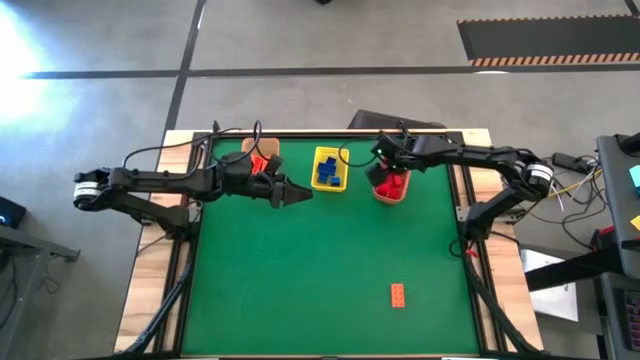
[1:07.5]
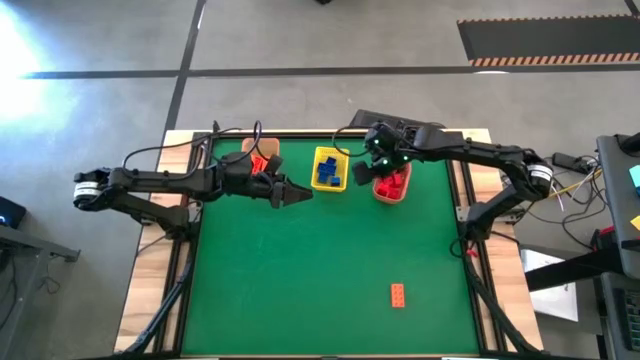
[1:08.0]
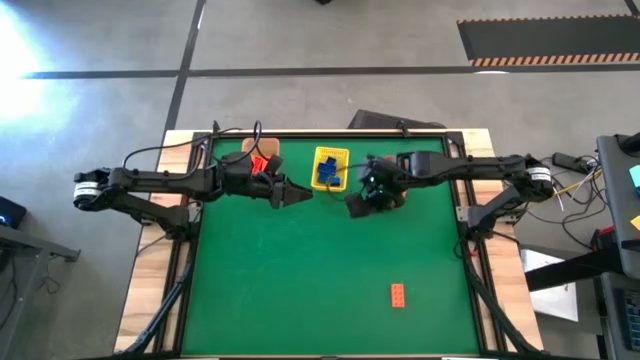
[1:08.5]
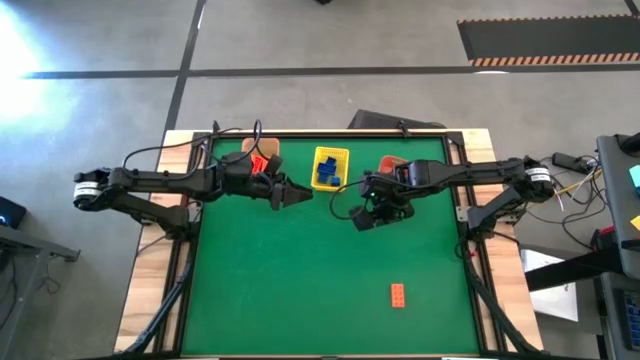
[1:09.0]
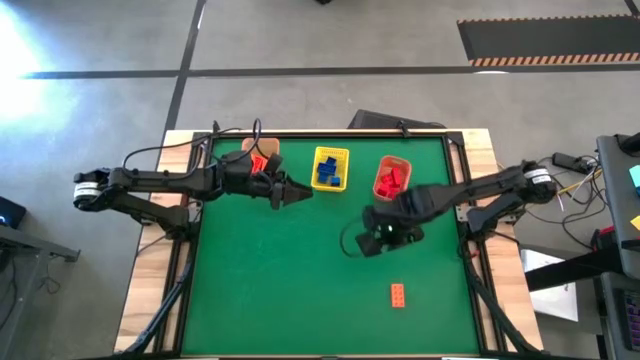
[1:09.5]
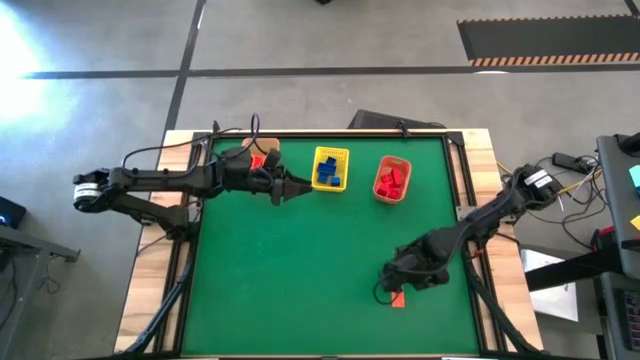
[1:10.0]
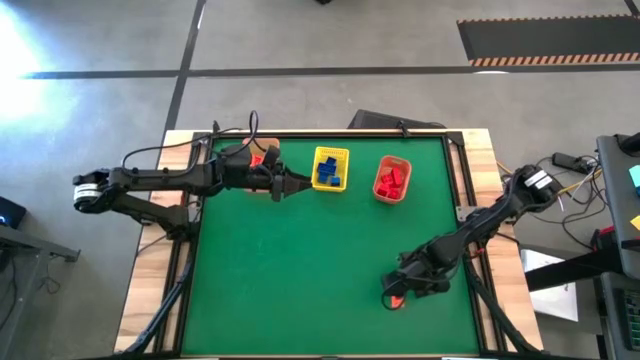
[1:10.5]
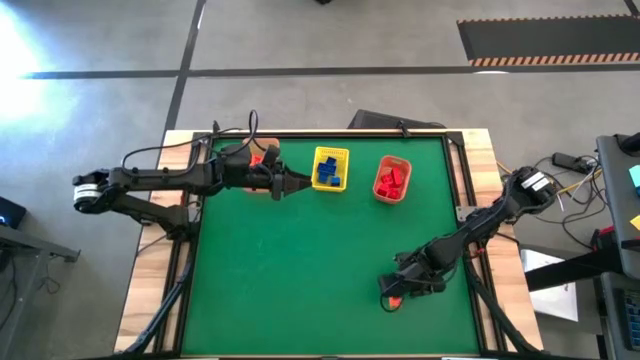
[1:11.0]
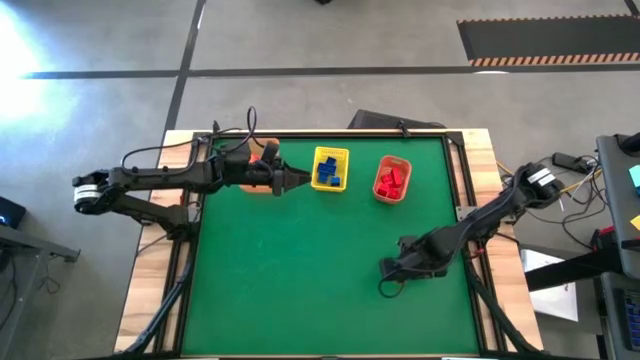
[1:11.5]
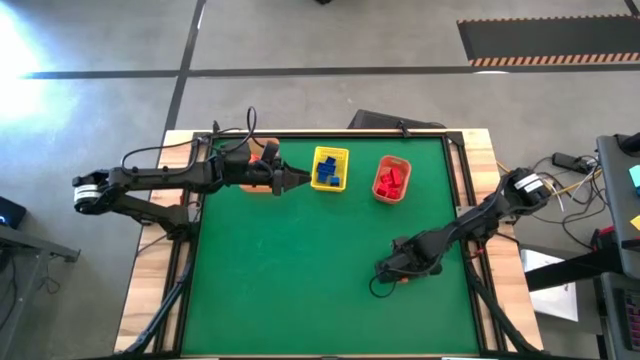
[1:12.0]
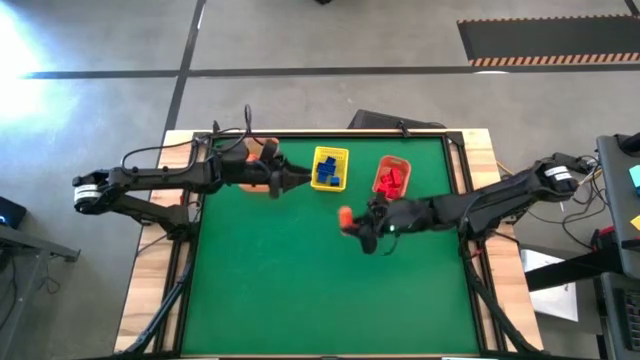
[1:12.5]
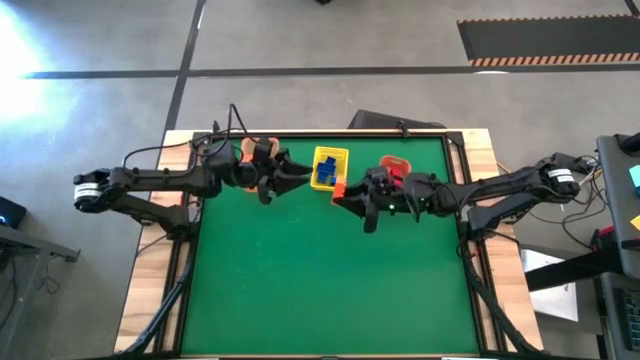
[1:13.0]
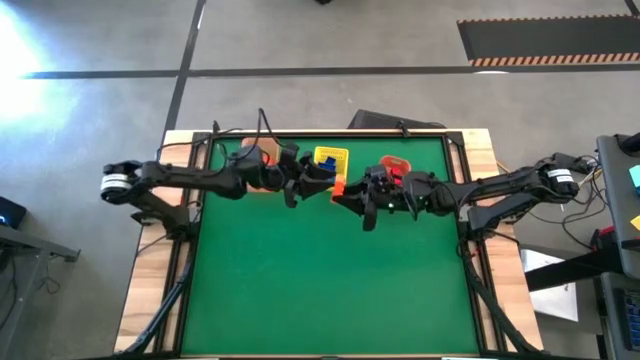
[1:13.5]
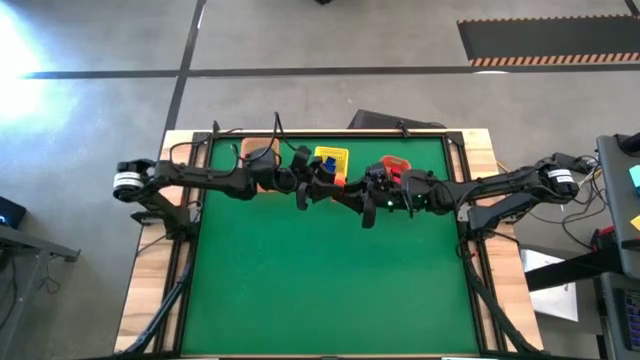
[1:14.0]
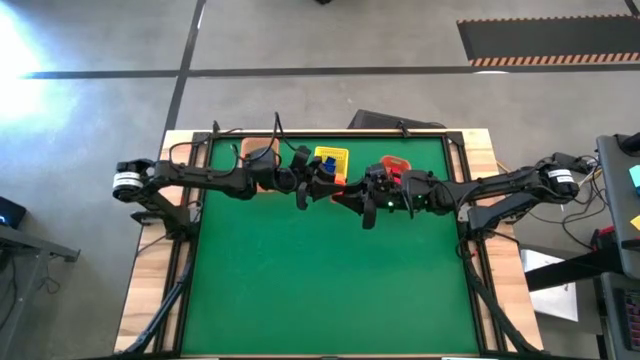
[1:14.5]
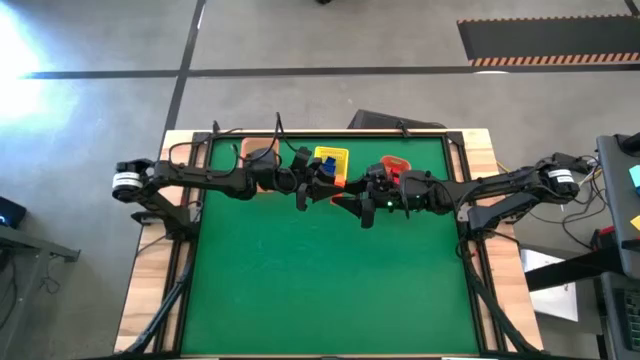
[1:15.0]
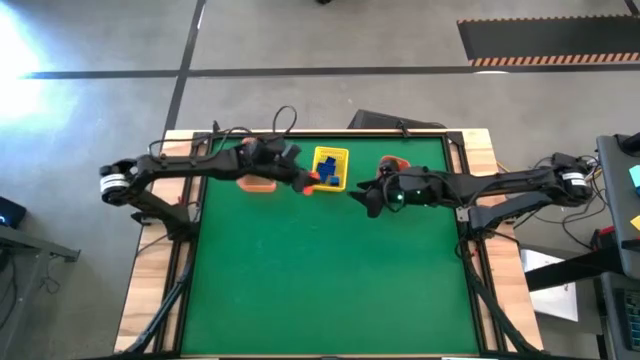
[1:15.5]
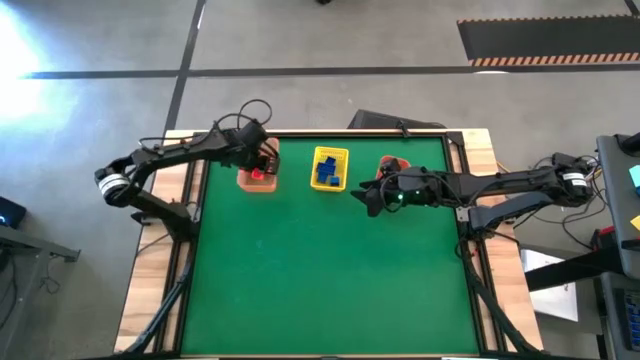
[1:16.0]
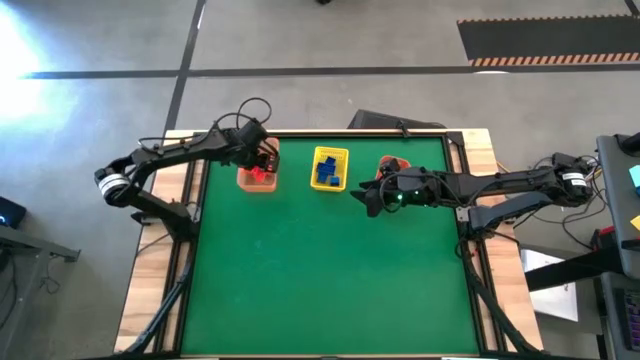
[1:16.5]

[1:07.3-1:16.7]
Task: Sort & place blocks by color
Put the orange game piece into the light orange bin

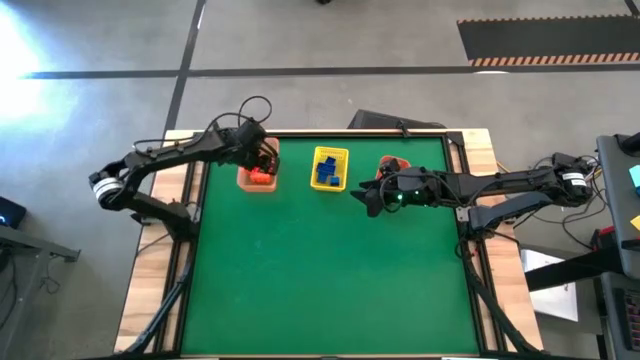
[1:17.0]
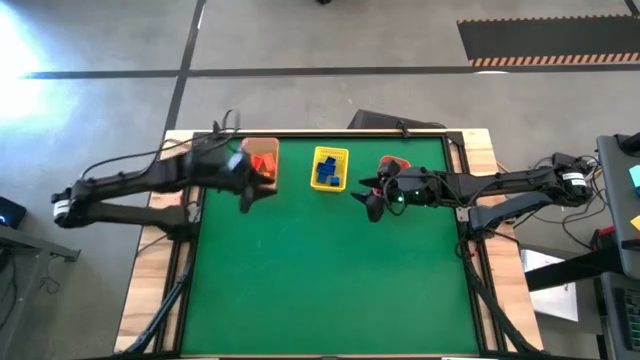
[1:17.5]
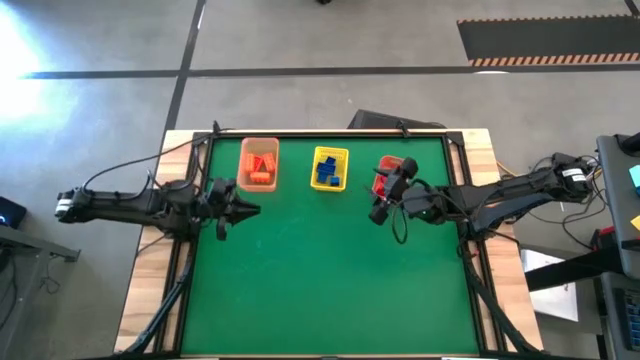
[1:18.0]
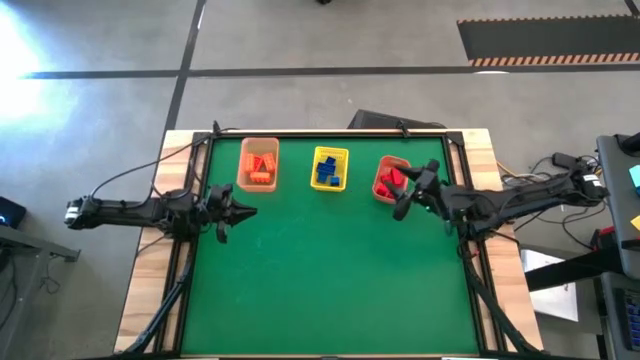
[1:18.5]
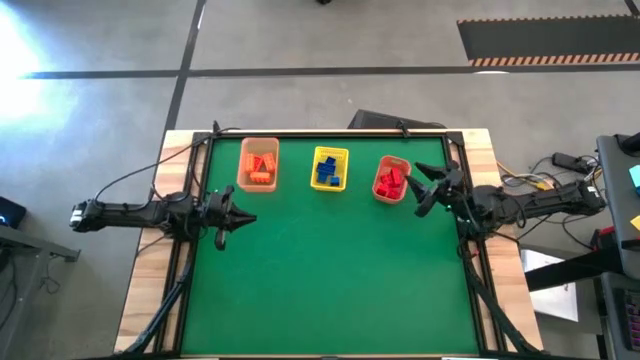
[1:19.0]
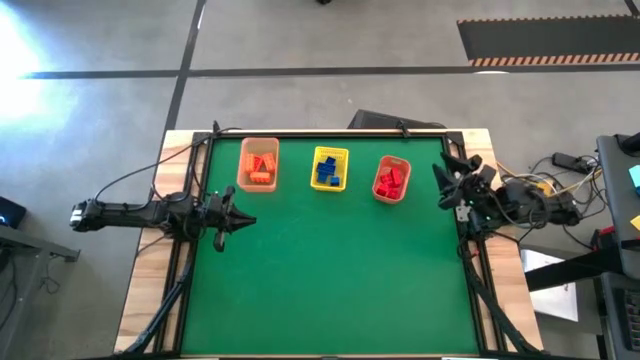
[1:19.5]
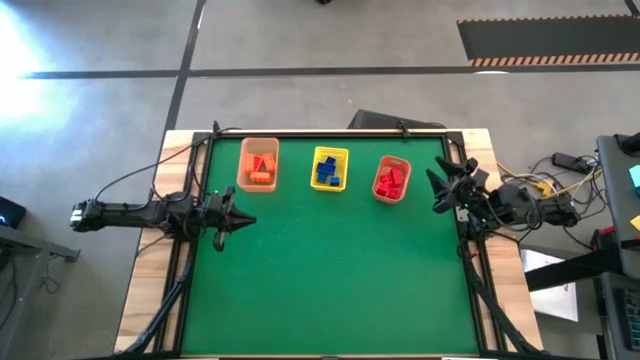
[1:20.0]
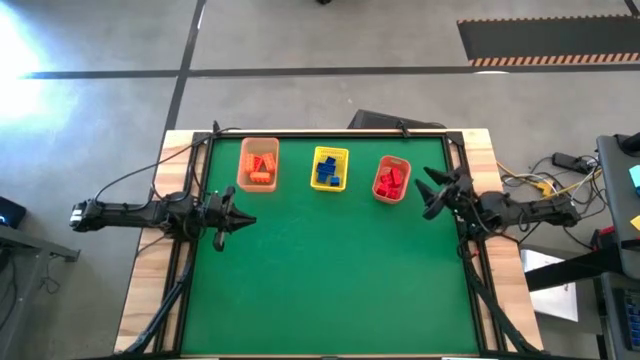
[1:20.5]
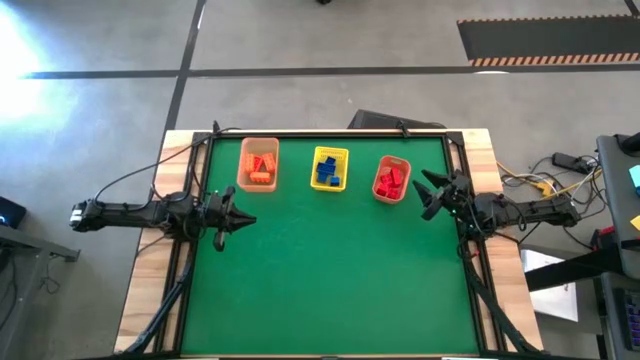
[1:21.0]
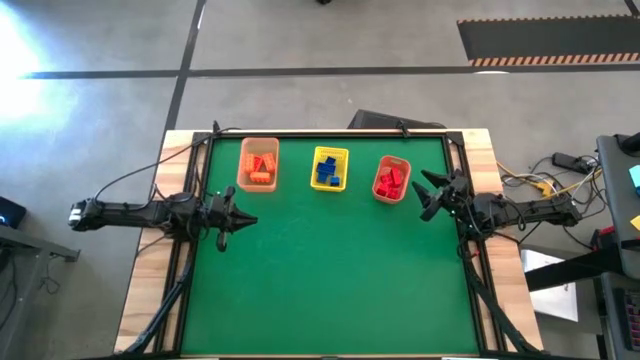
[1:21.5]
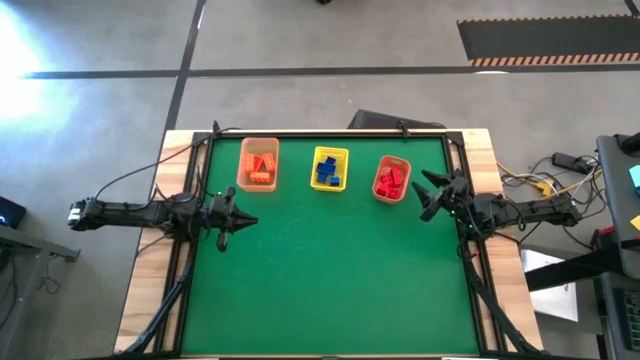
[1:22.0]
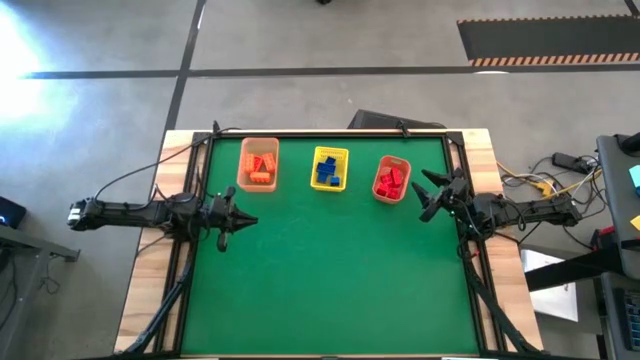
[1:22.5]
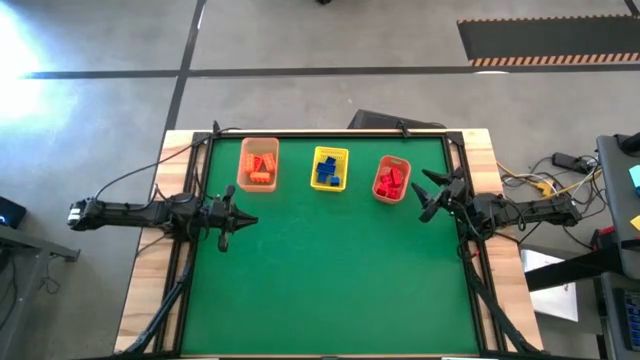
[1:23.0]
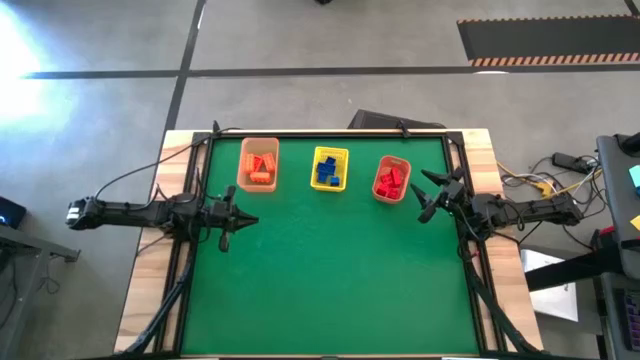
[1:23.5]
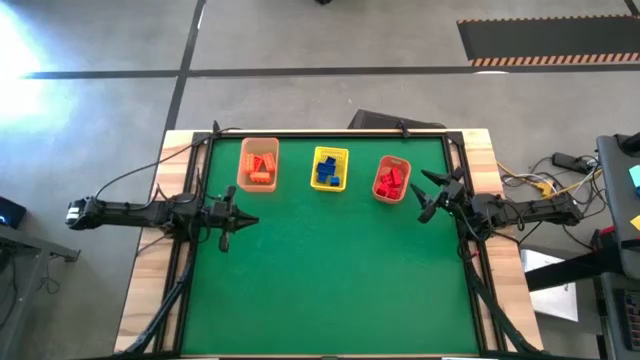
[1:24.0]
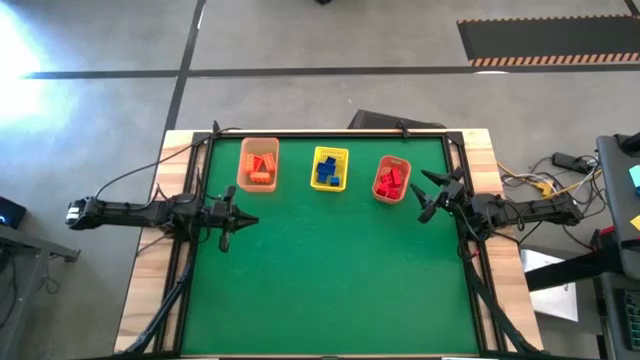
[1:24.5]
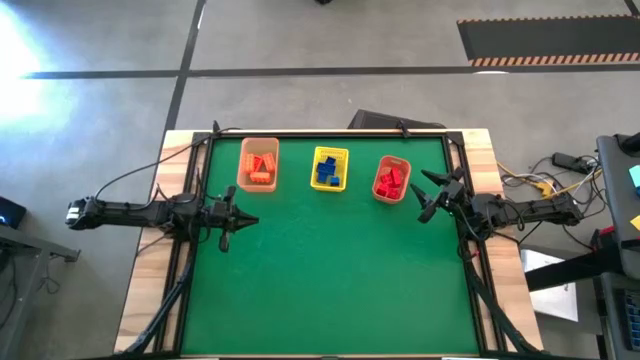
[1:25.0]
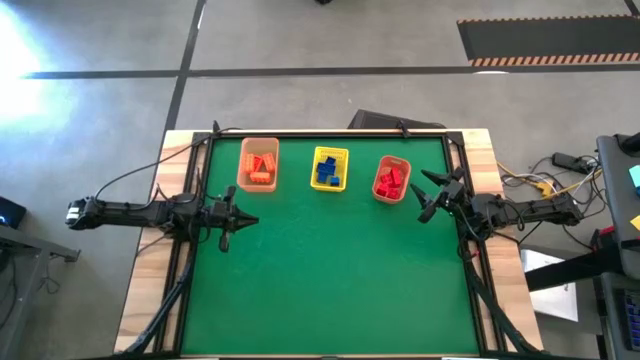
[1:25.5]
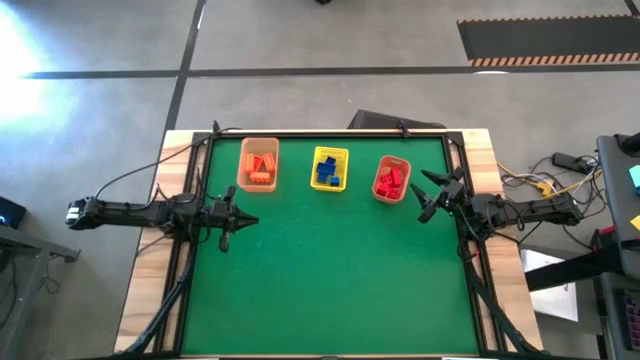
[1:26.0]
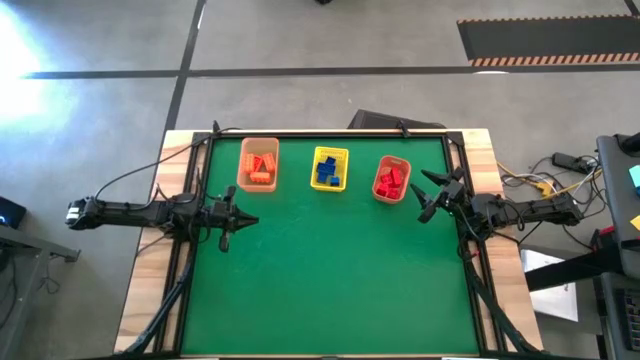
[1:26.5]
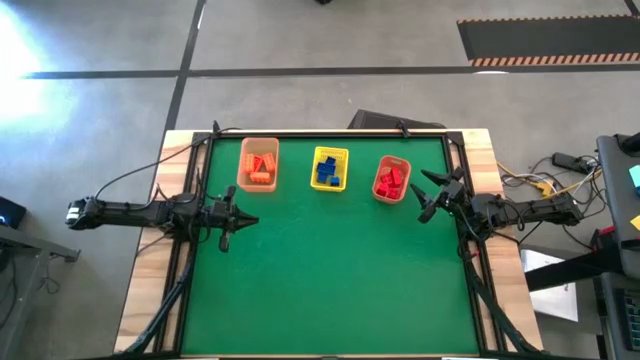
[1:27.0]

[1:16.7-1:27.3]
Return to Home Position

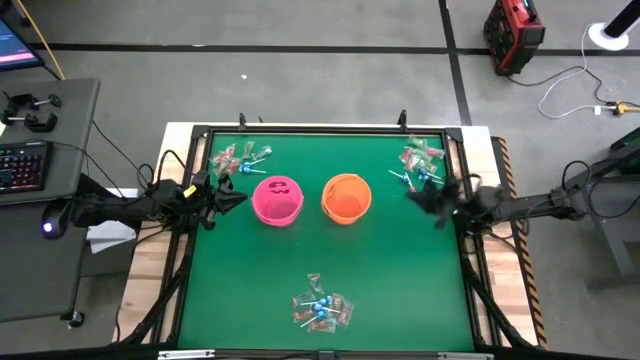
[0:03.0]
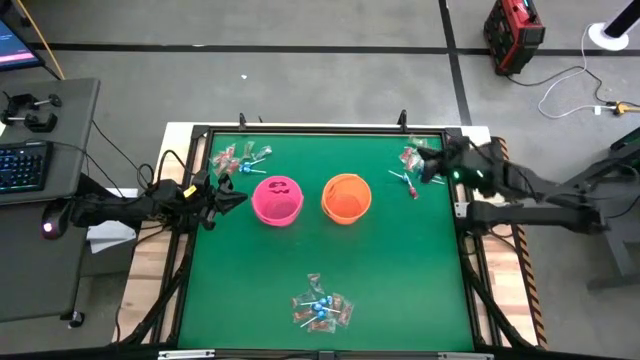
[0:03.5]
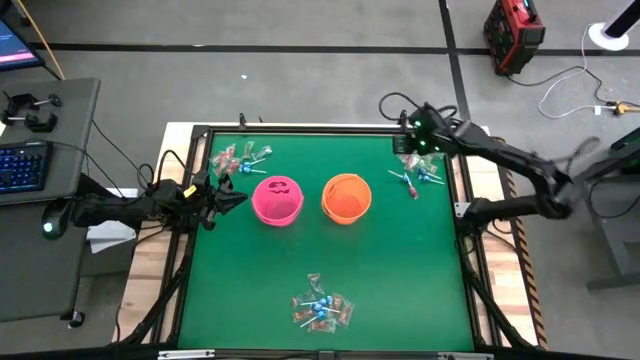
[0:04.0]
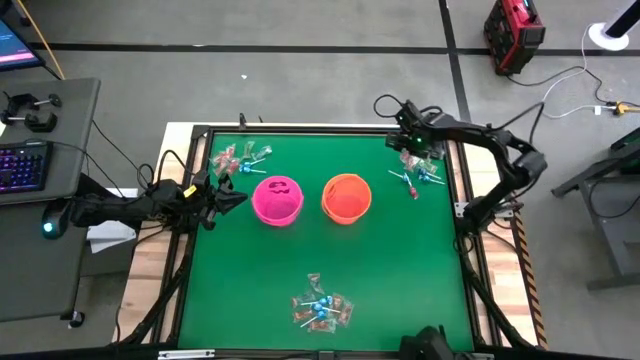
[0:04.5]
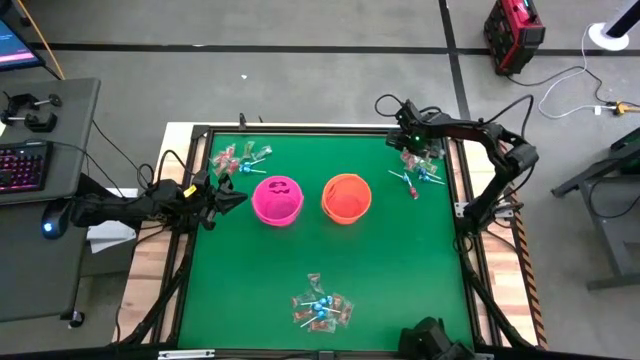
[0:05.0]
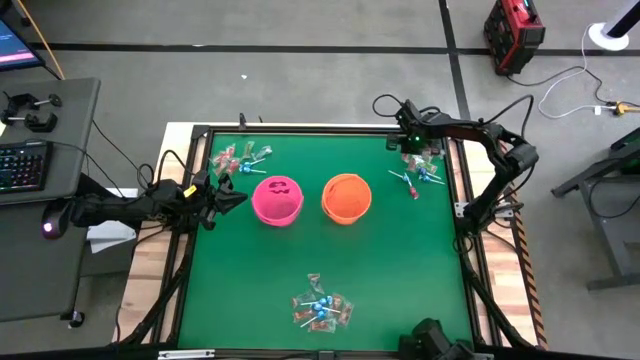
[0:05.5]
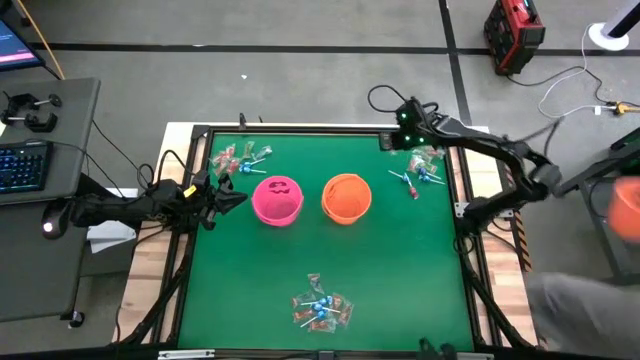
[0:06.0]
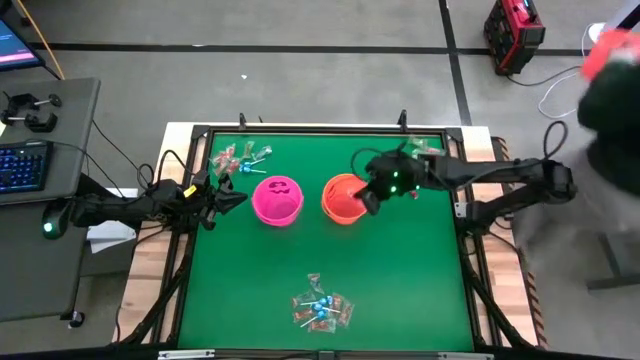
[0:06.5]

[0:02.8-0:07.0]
Task: Sort candy by brand, put in halloween buckets
Put the red gummy into the orange bucket
